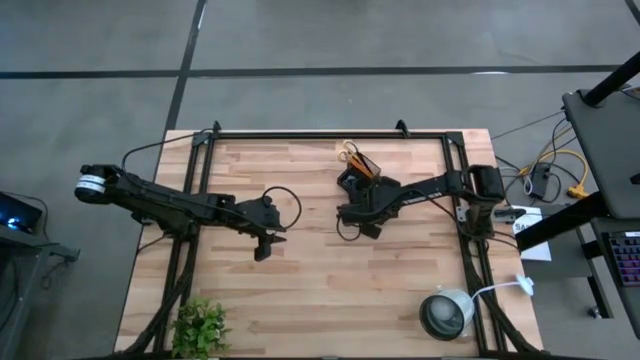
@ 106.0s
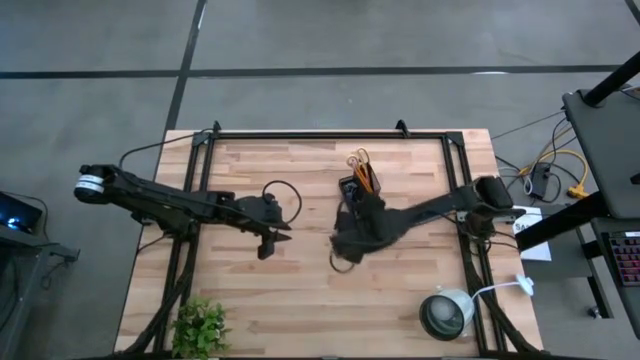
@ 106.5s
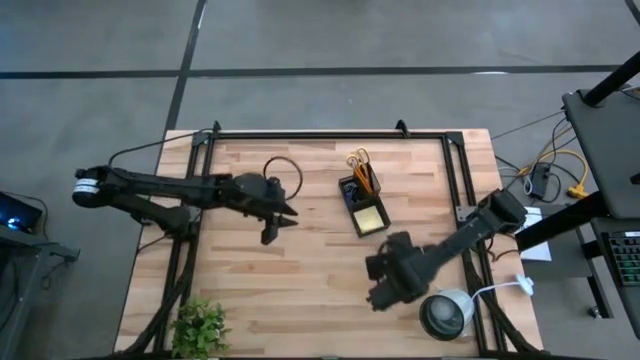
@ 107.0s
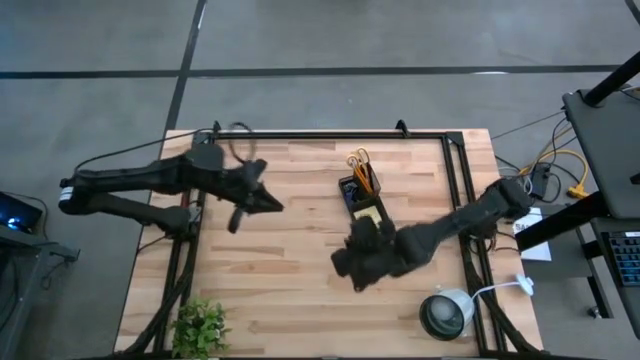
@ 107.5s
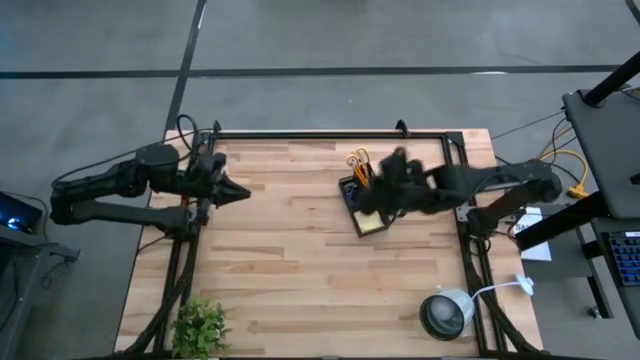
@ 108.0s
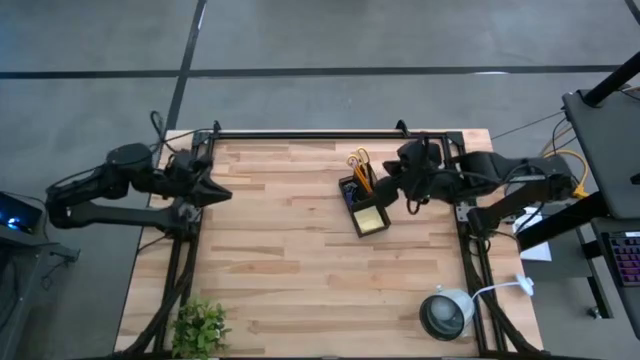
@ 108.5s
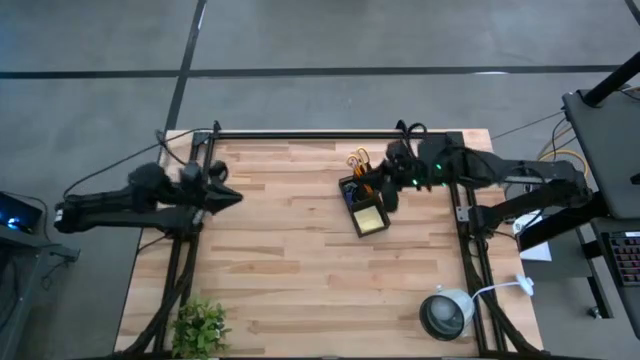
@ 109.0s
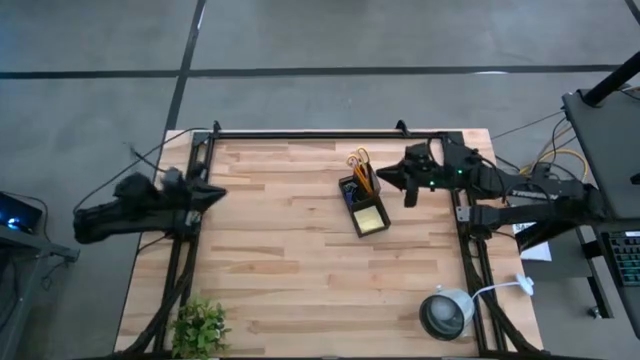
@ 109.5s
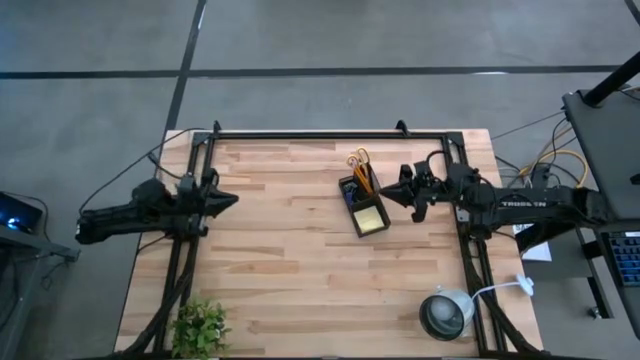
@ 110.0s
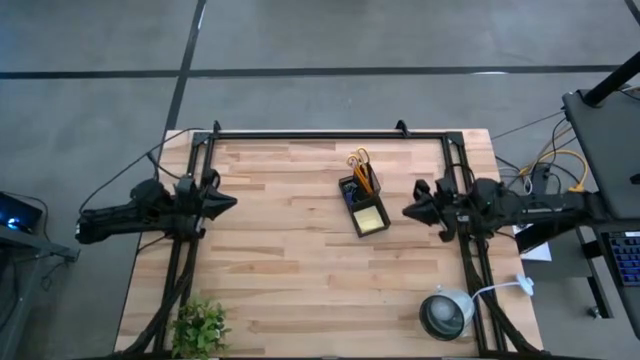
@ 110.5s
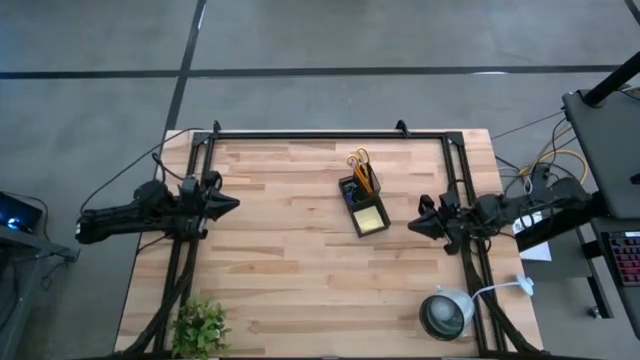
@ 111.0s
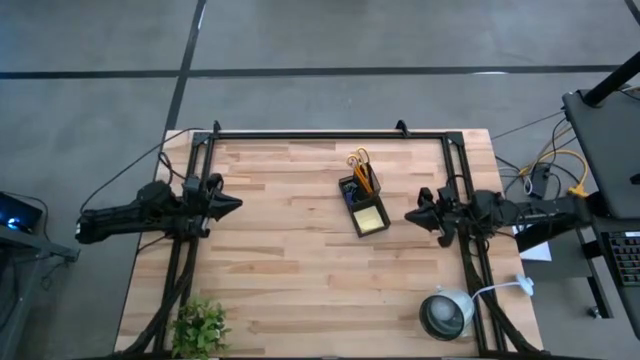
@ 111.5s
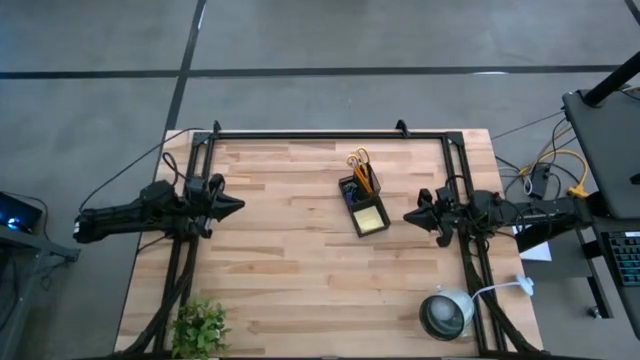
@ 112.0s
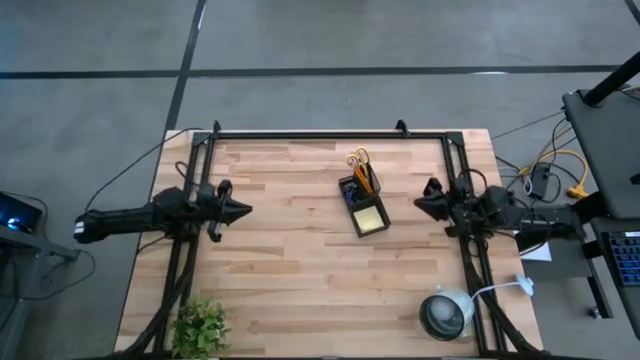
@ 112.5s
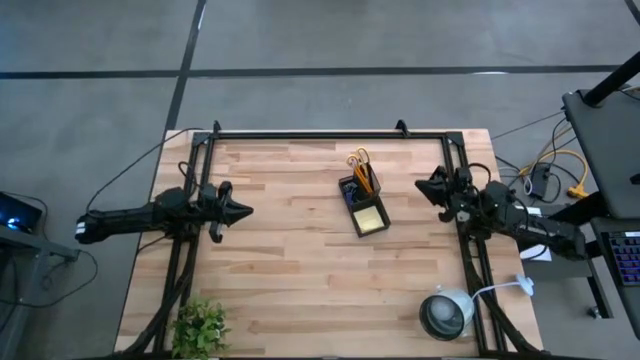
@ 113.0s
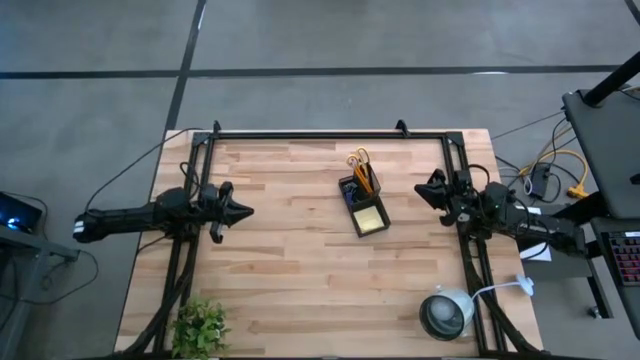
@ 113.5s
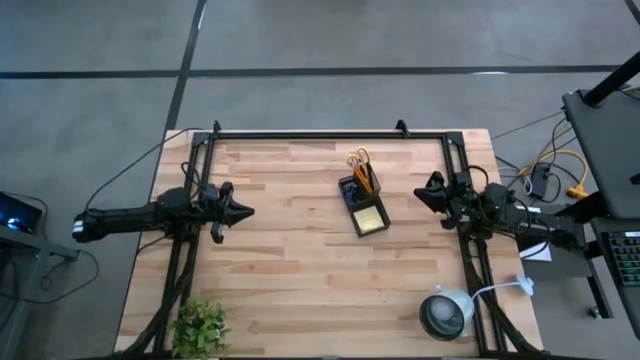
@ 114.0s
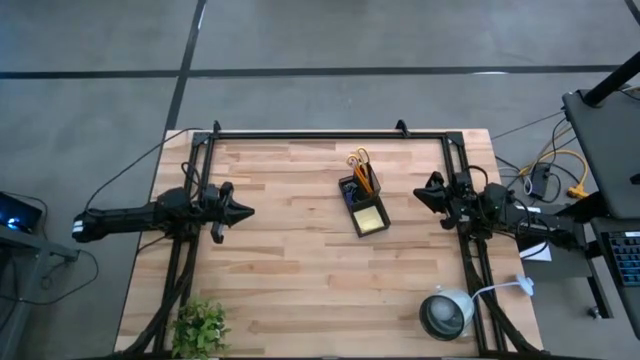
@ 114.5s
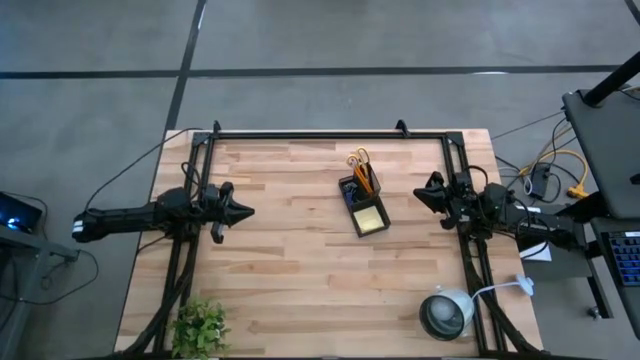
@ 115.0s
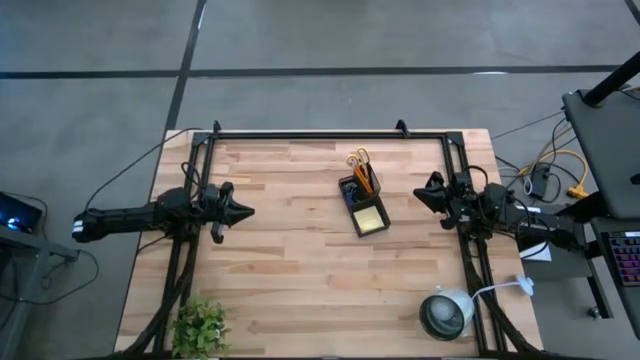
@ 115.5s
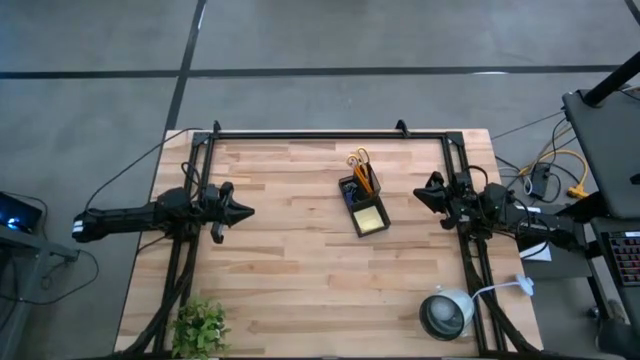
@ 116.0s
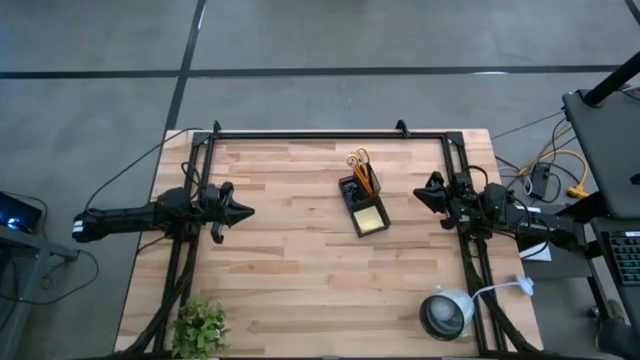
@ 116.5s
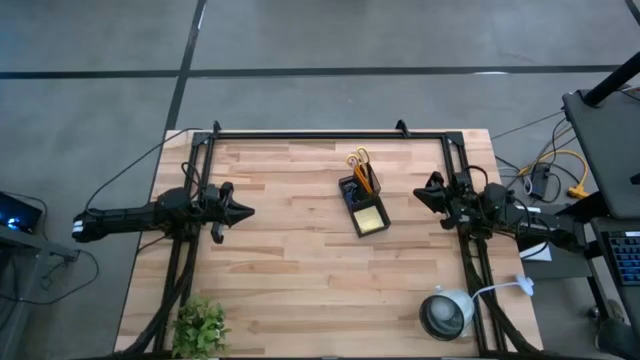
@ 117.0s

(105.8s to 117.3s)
Task: Pick and place office supplies into organizer
Return to Home Position

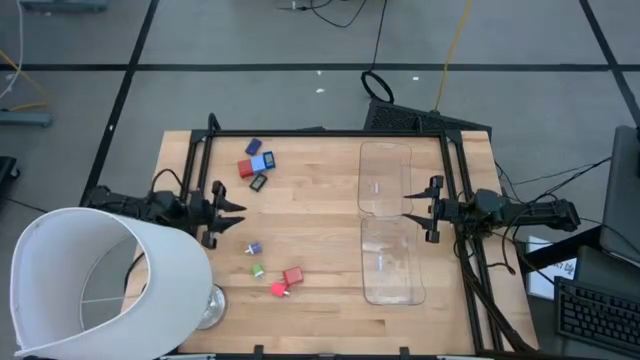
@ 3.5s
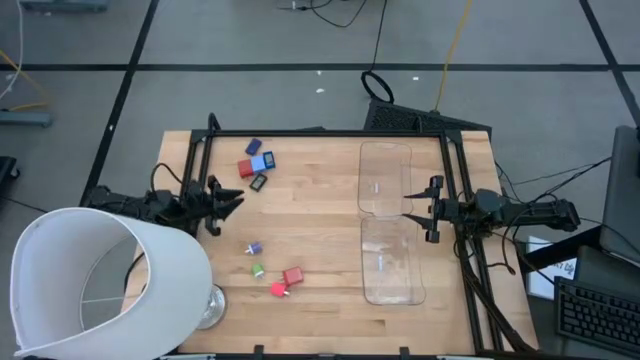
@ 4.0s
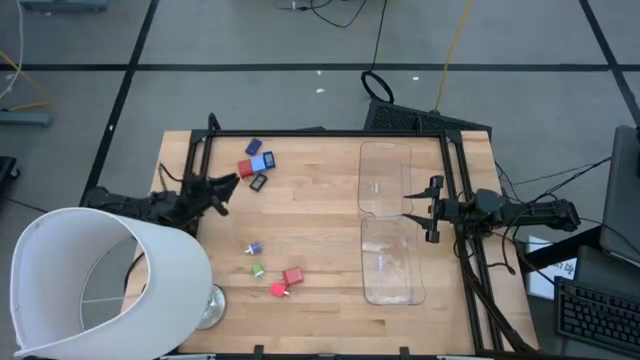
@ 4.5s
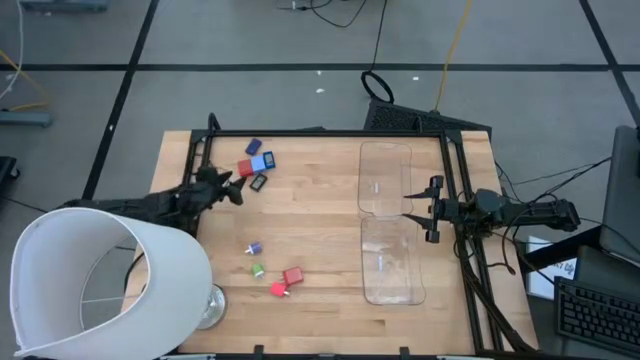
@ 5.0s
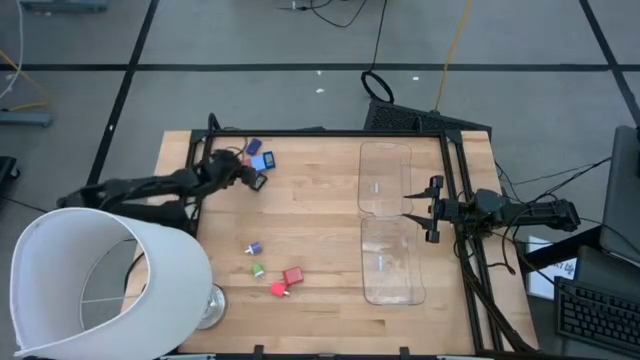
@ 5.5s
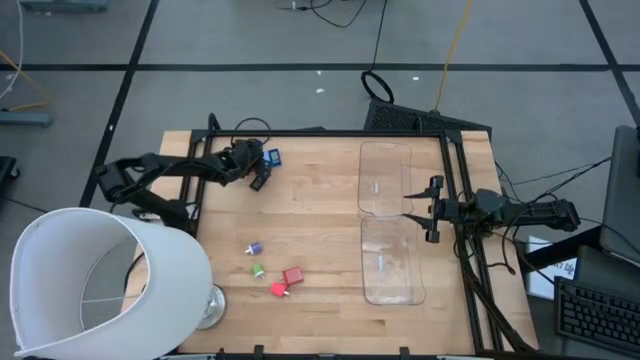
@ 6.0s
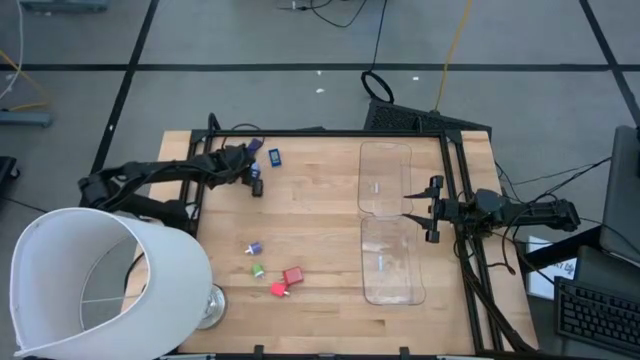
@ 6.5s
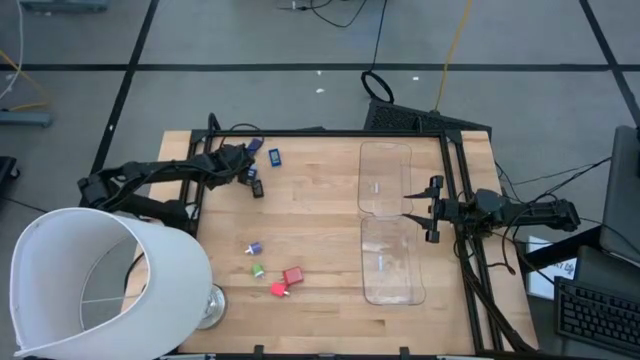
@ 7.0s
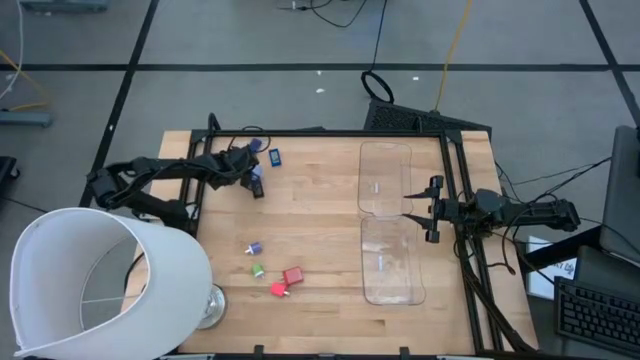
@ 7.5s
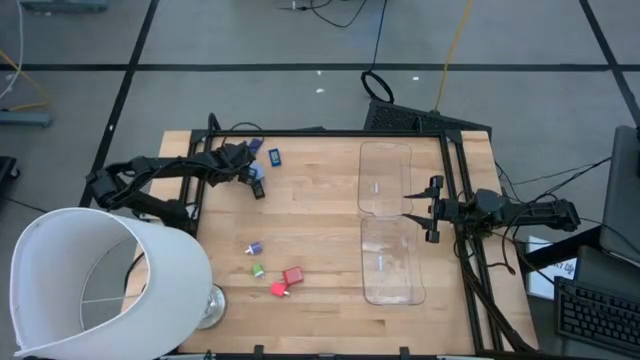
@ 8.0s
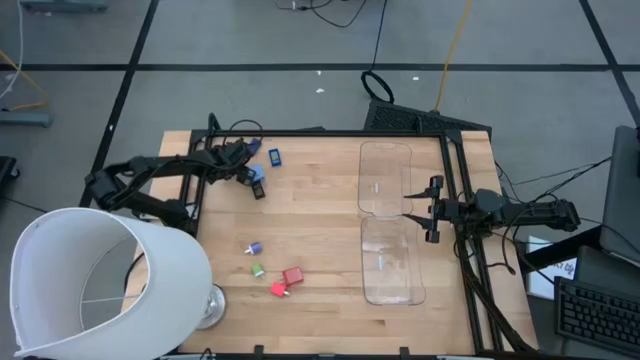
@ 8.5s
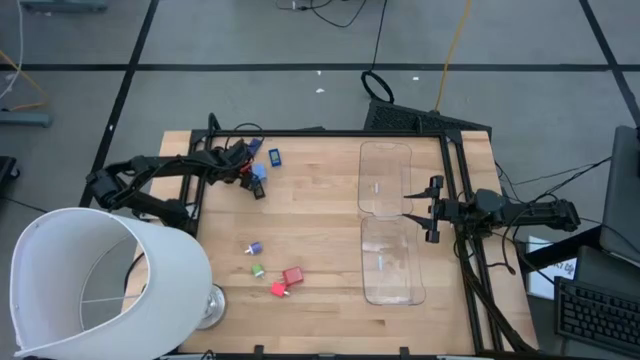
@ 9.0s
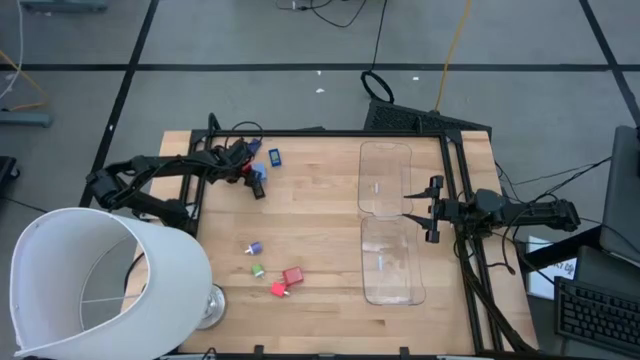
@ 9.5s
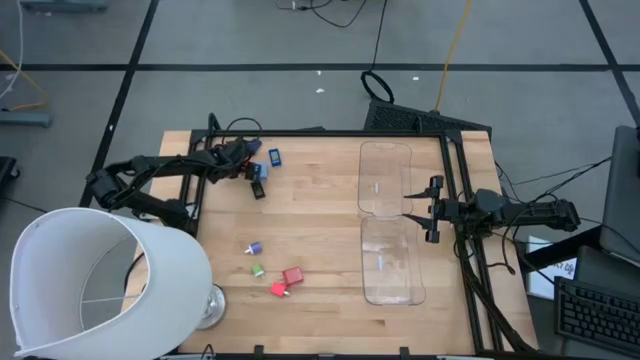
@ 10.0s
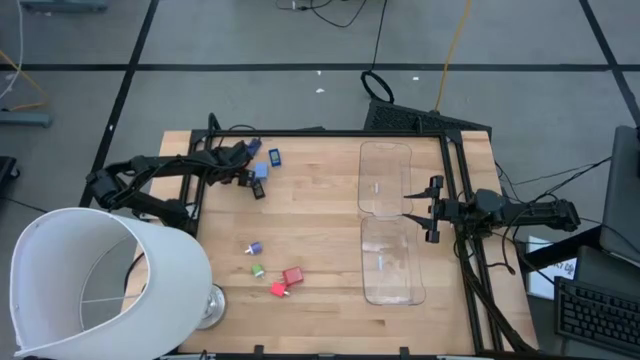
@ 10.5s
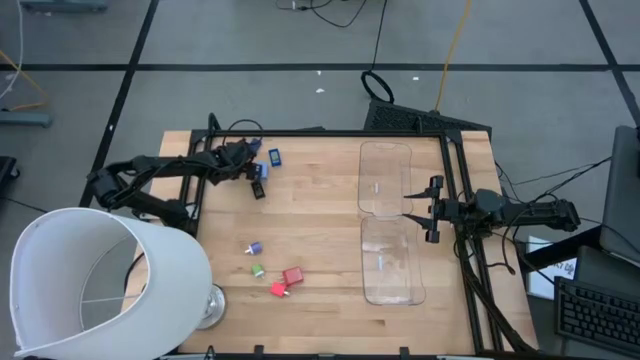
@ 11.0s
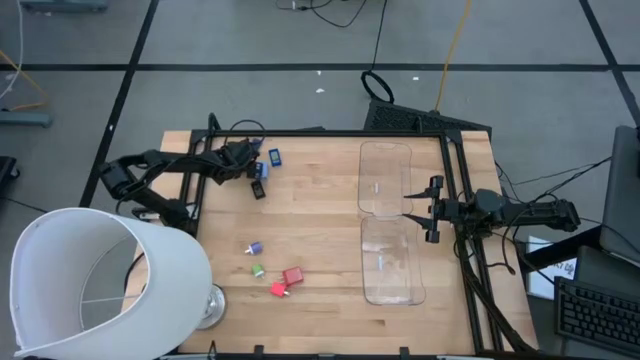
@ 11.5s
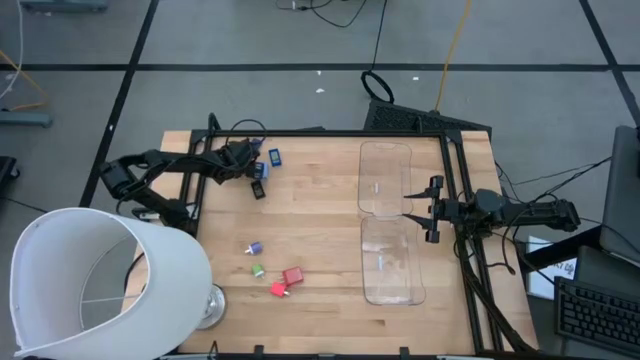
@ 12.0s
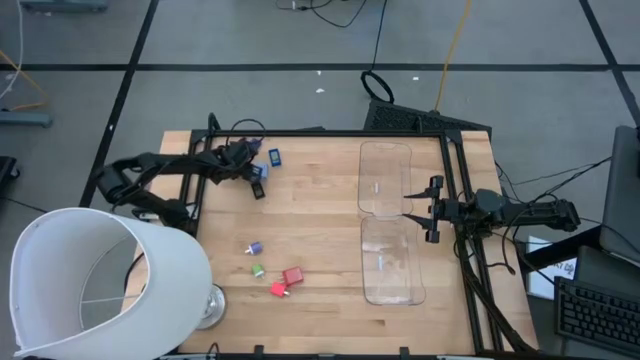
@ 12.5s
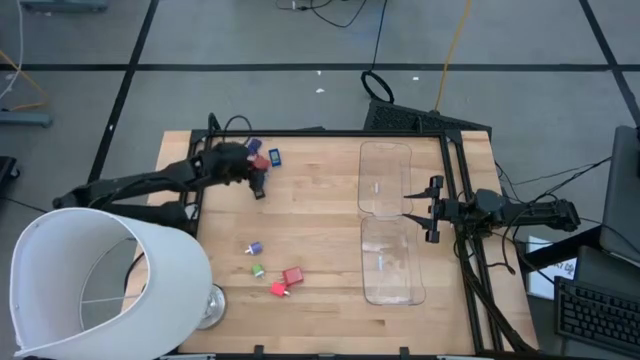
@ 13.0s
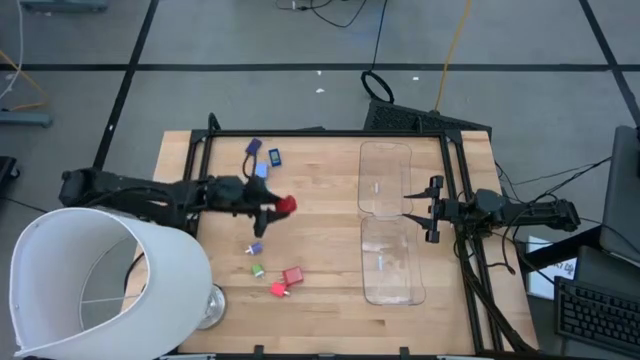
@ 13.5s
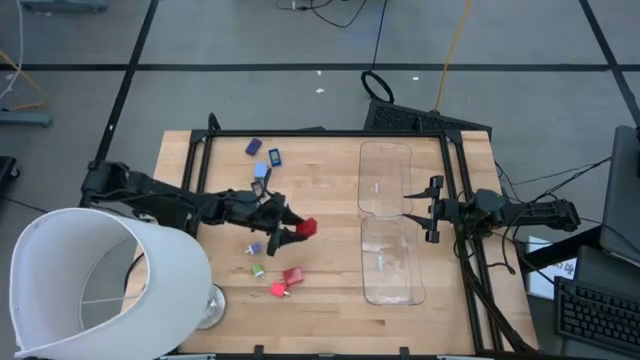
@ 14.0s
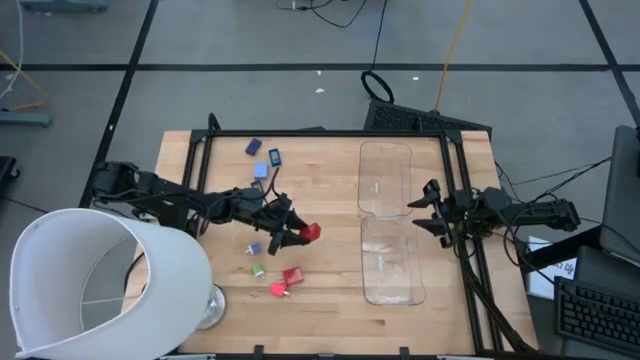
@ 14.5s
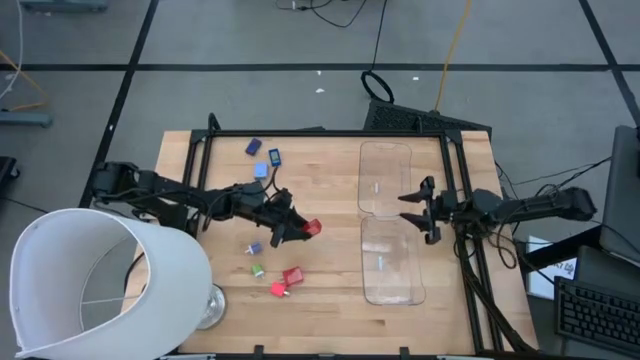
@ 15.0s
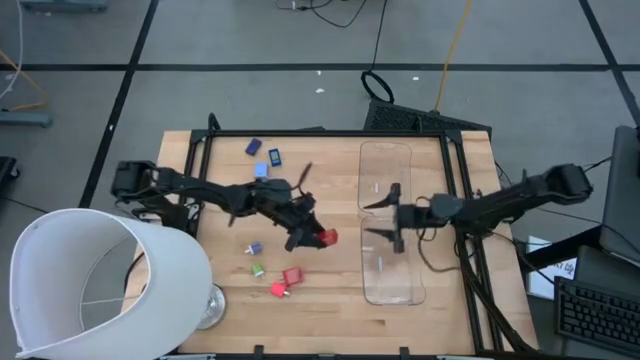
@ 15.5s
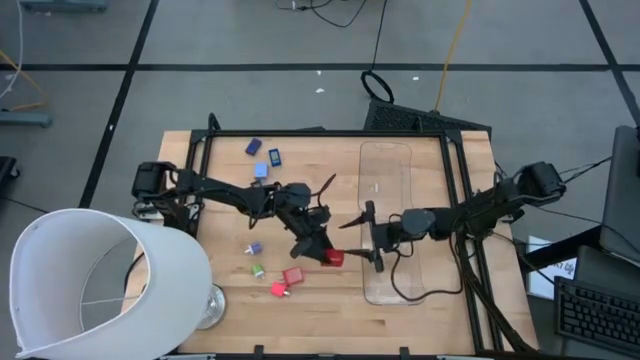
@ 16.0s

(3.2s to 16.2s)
Task: Pick & Place Office items
Put the top red charger adapter into the top transparent bin
